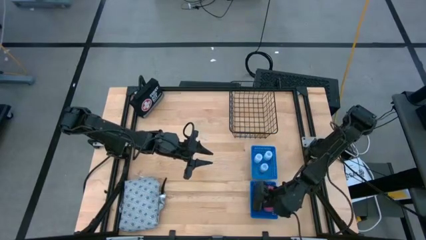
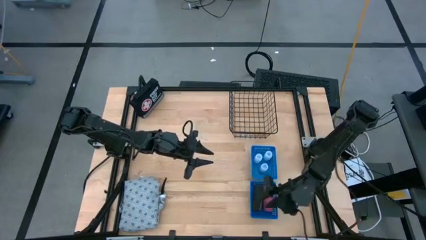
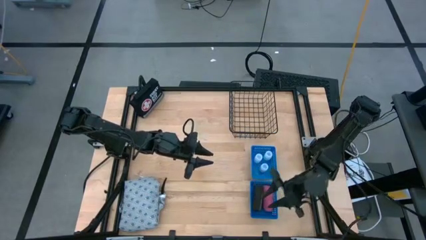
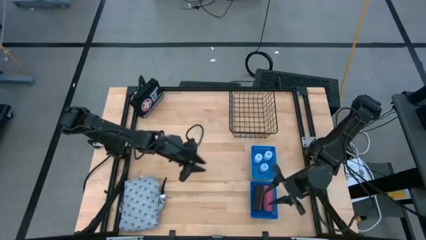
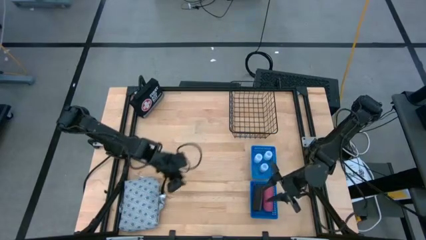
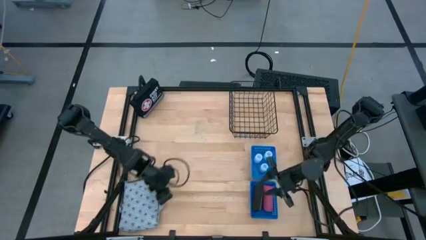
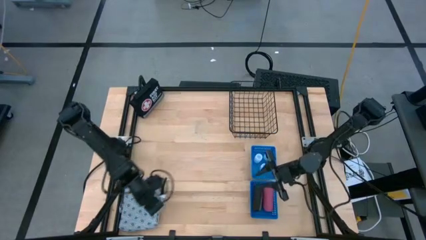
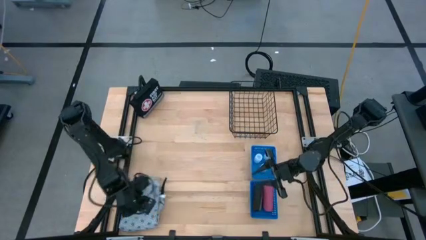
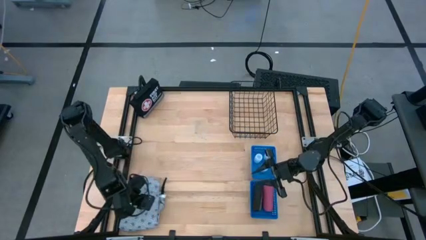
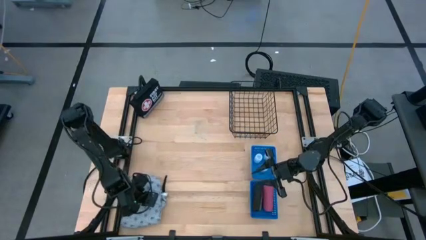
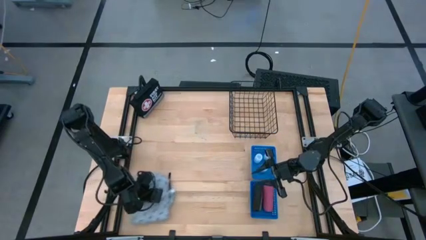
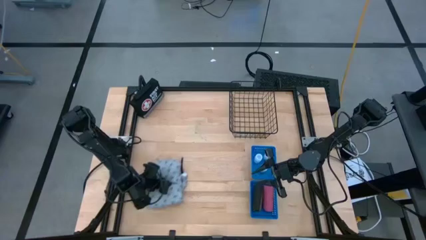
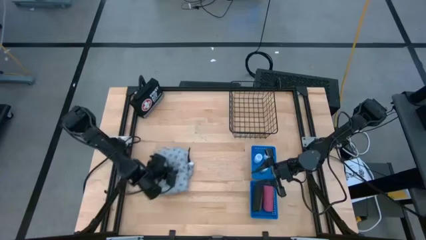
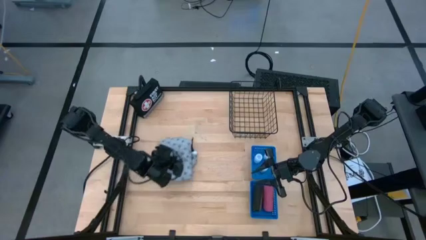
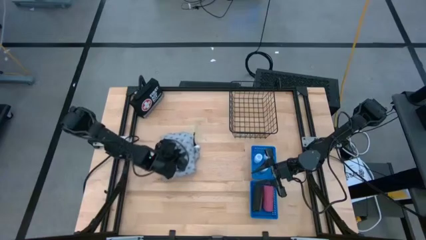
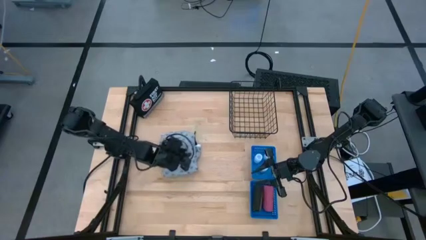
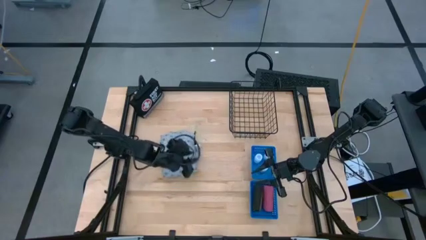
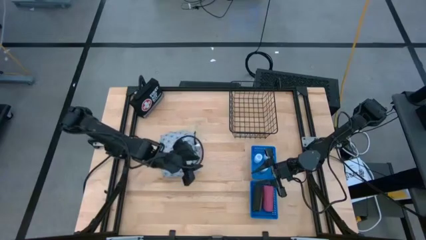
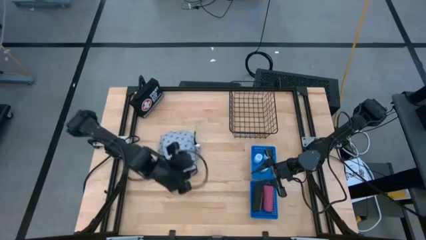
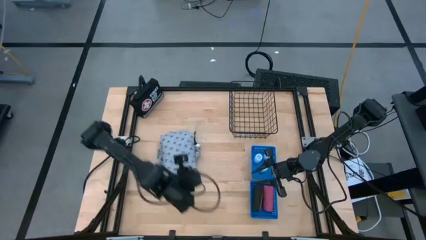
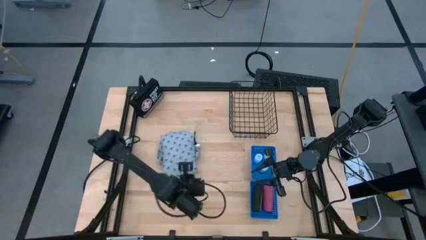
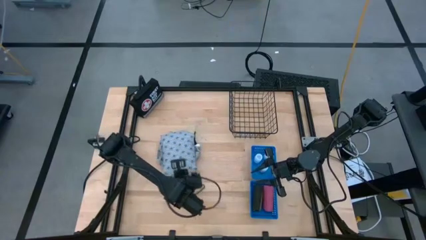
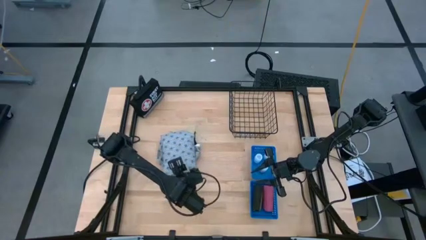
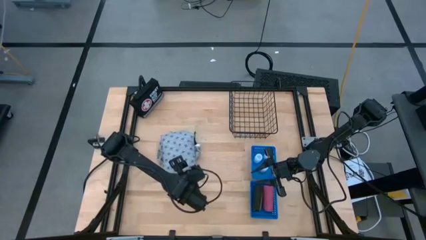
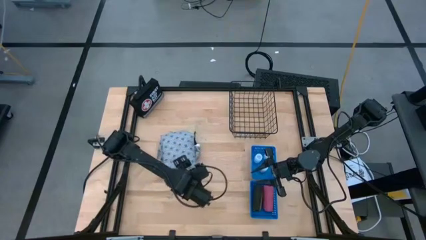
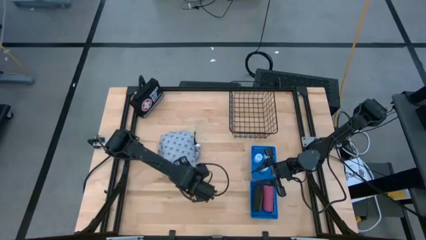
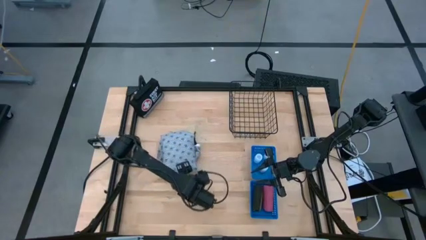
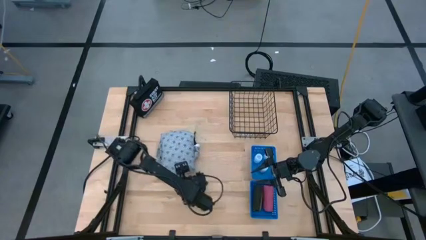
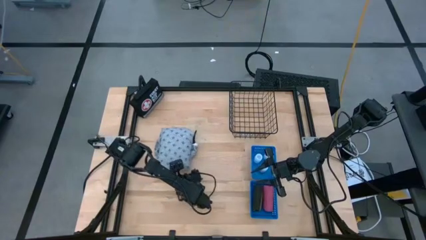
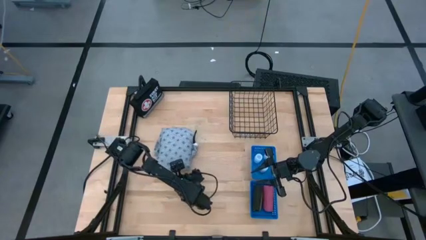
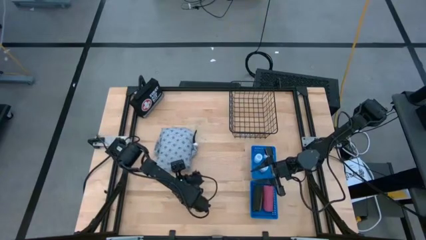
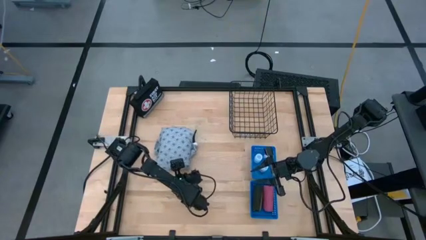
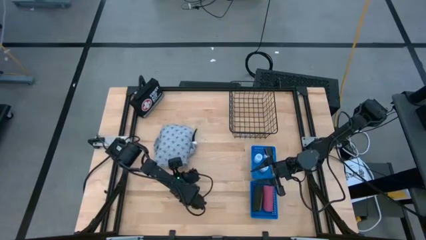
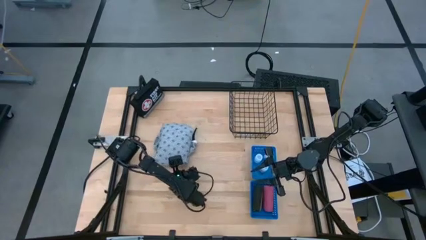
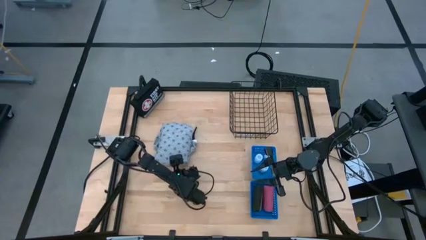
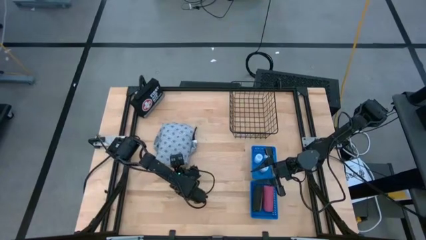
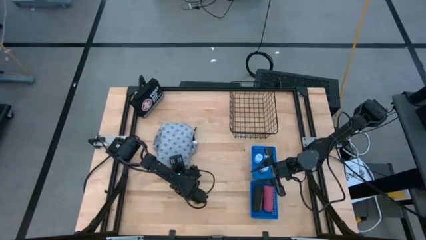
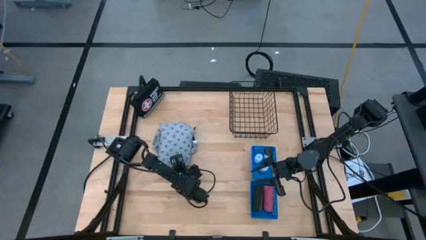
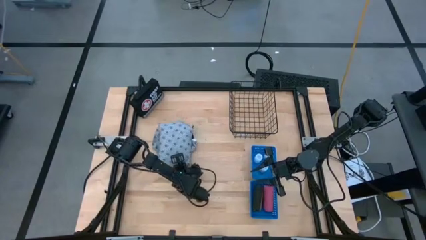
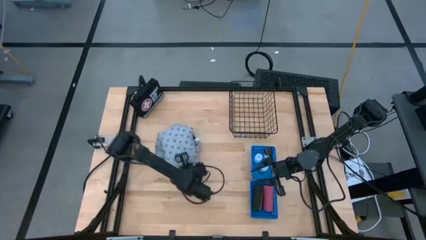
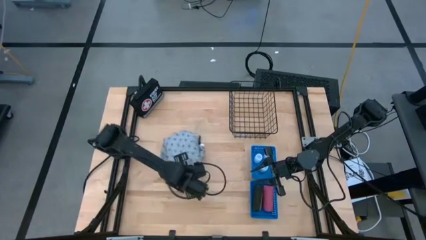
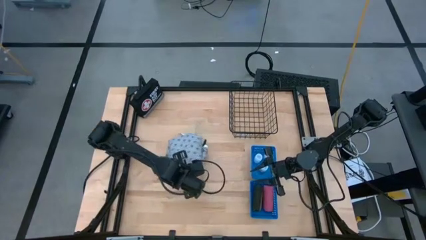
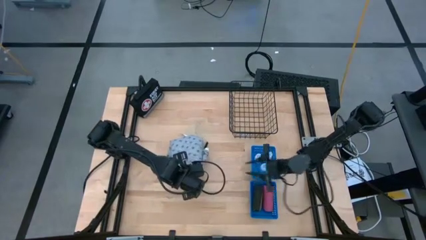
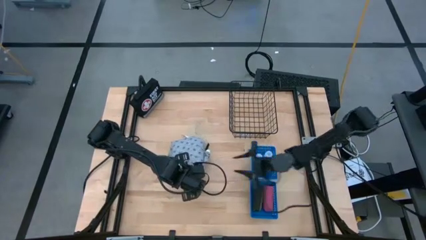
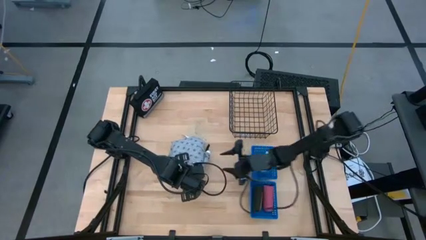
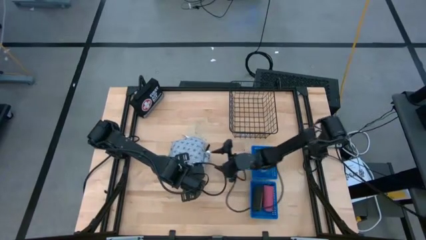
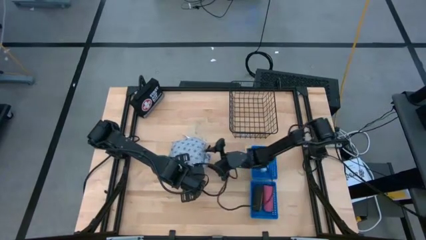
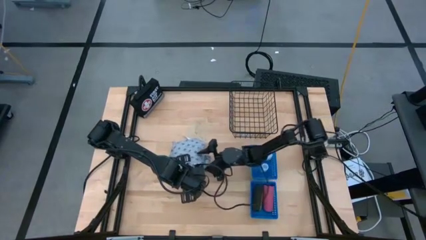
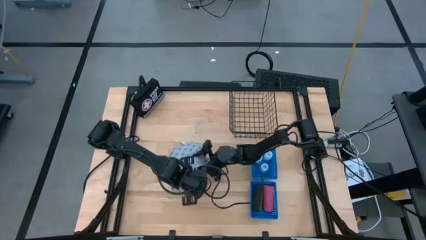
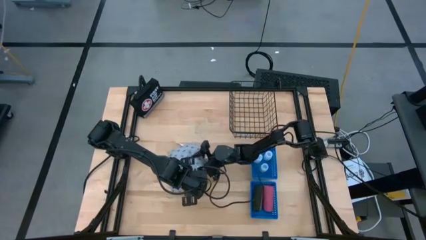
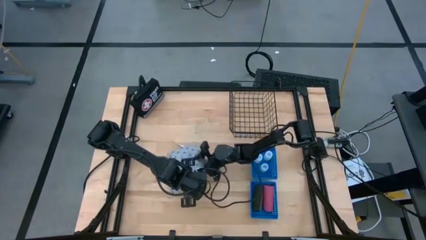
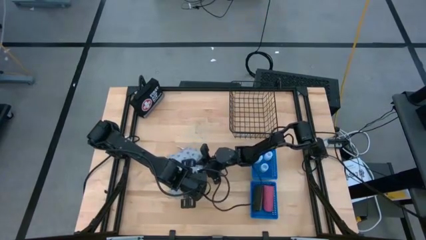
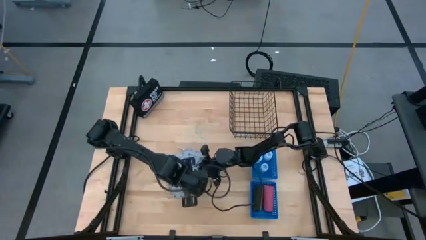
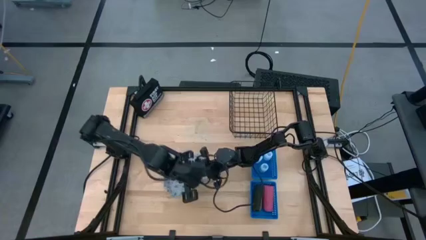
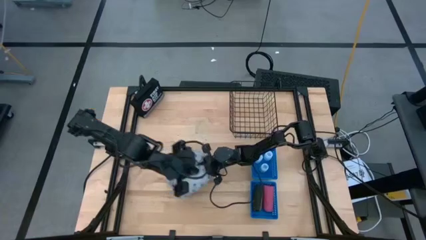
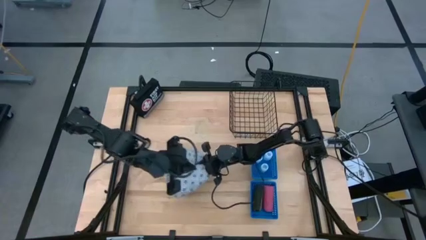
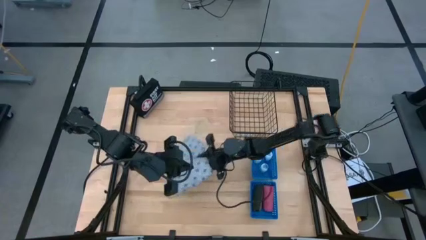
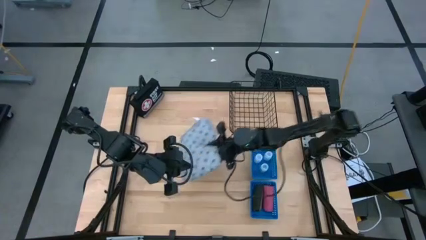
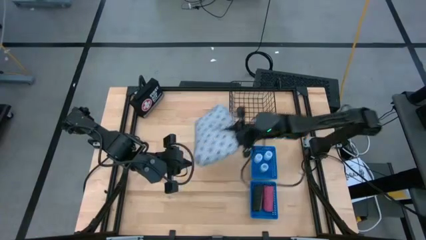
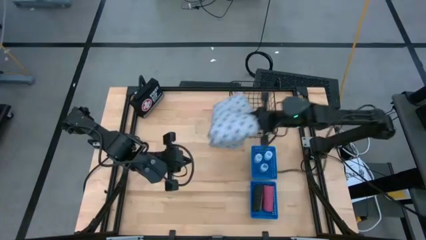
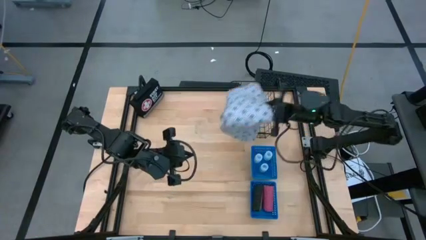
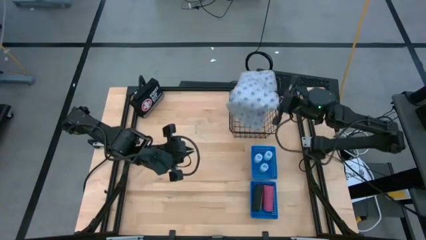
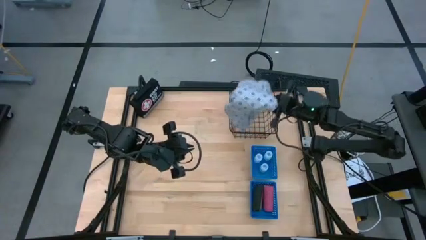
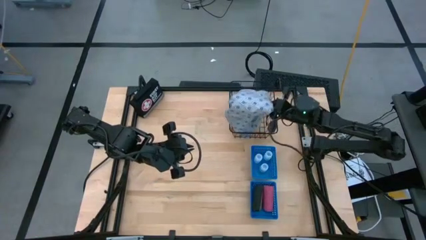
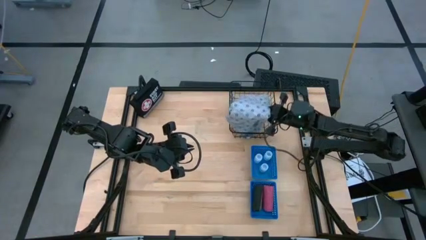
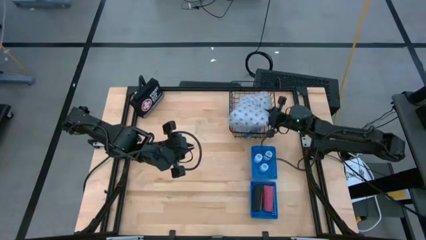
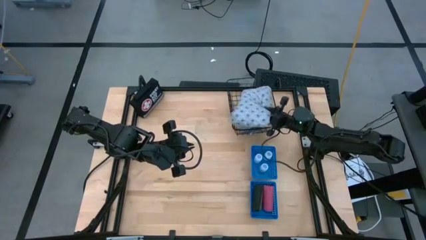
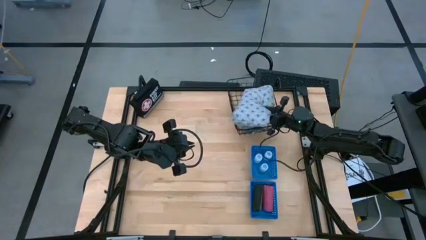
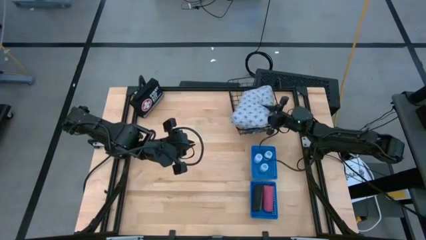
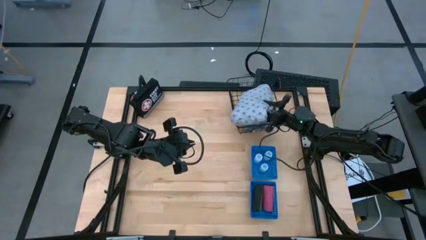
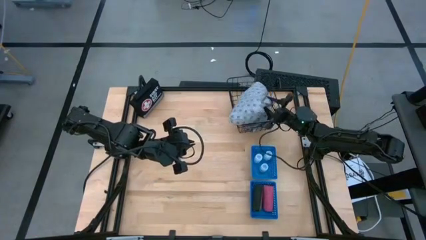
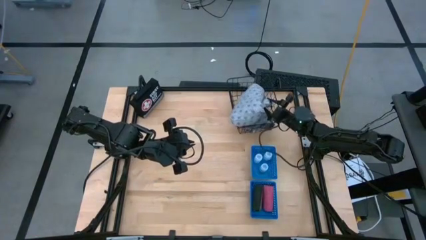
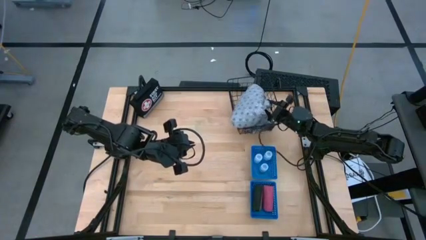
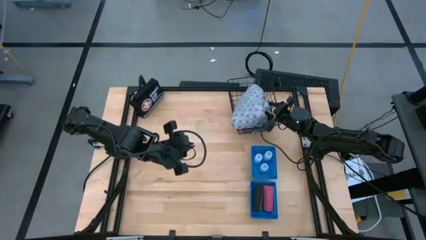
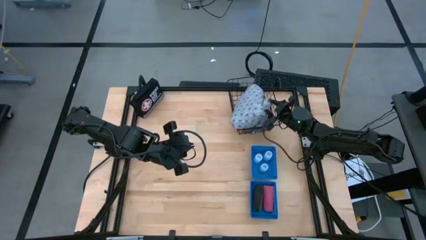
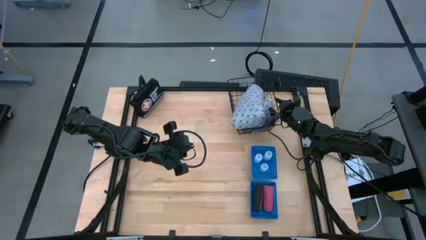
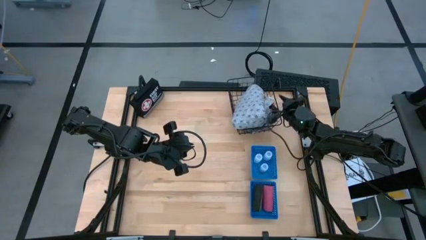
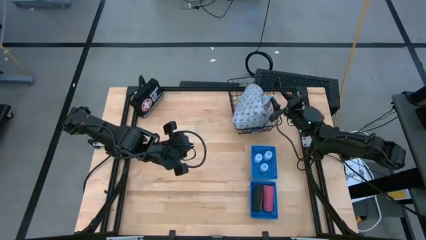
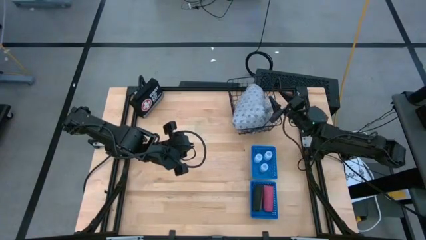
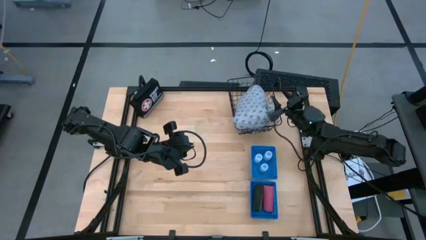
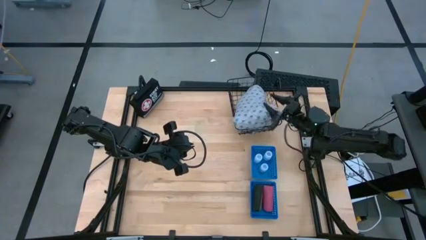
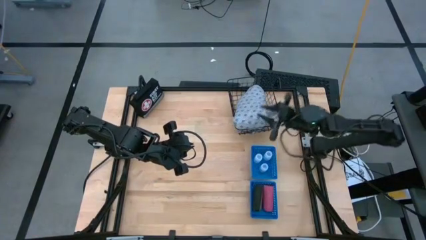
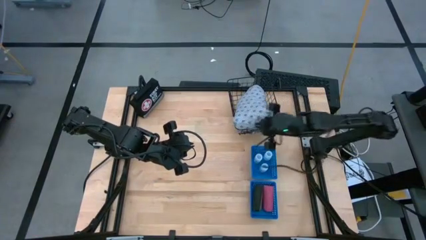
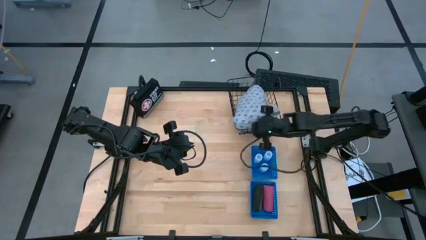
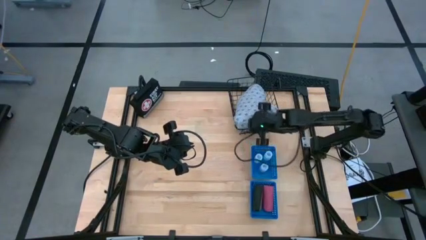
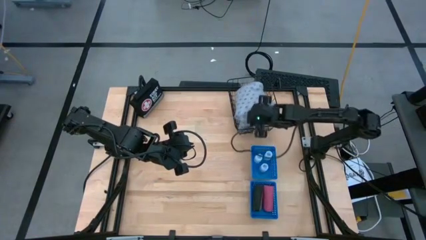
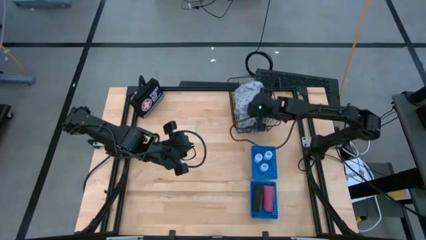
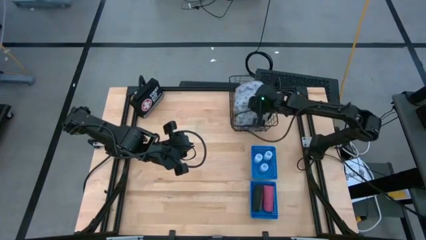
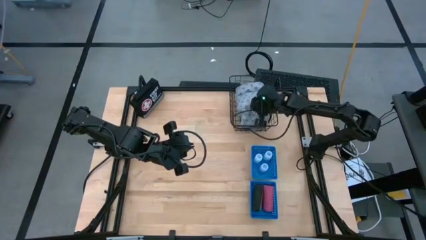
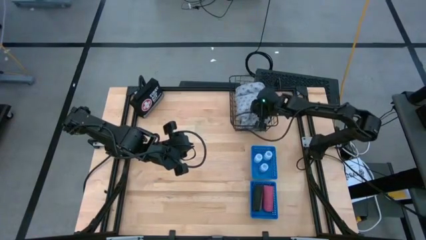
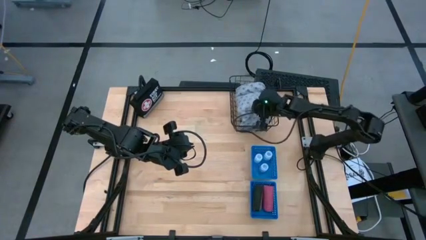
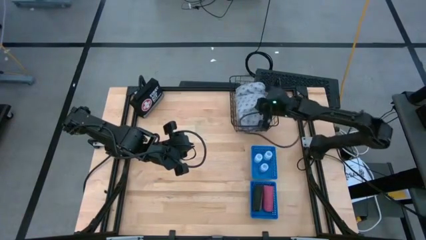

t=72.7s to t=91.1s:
Task: Pick & Place Medicine items
Put the blue patient gown into the wire basket
